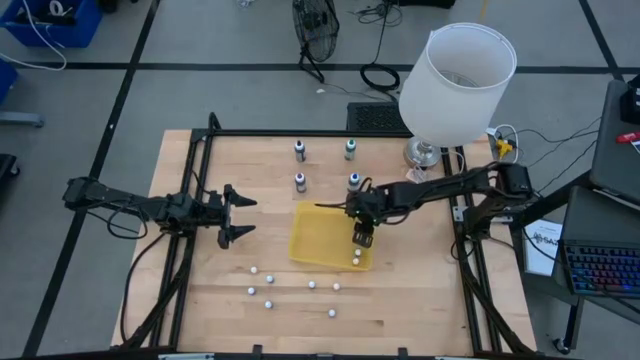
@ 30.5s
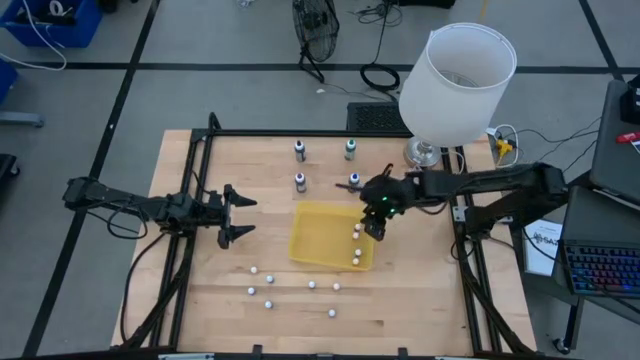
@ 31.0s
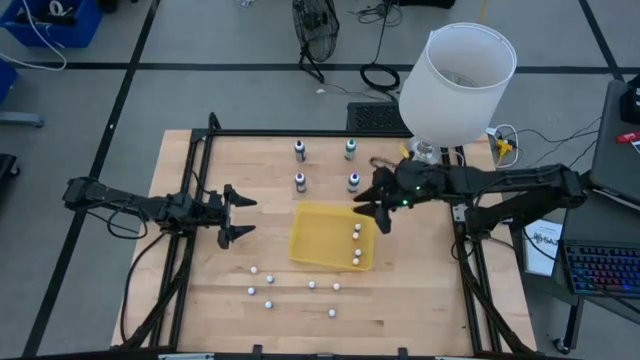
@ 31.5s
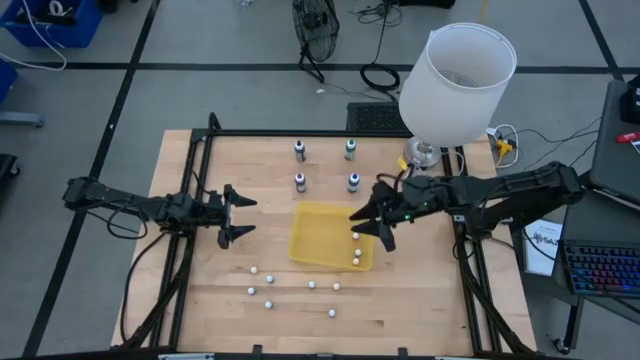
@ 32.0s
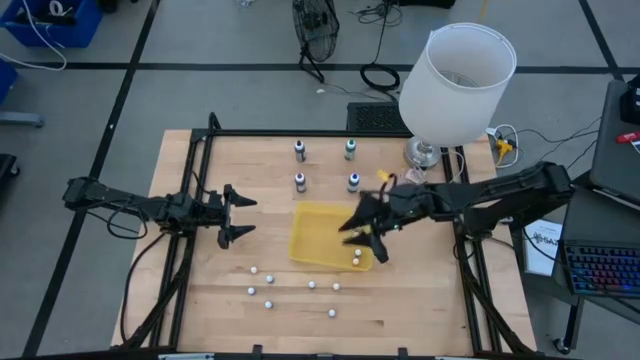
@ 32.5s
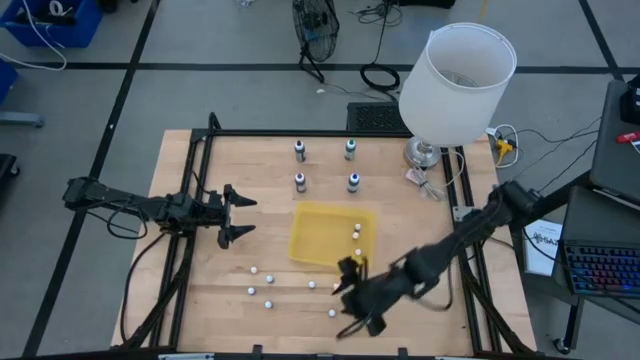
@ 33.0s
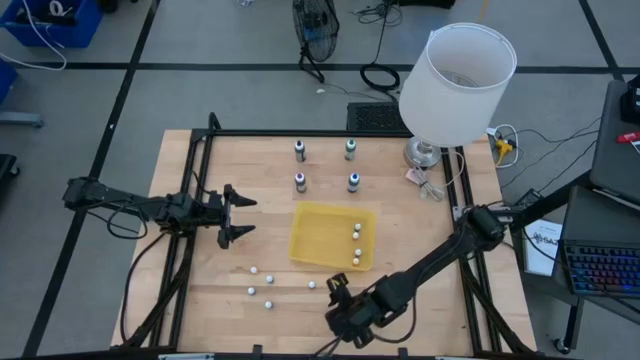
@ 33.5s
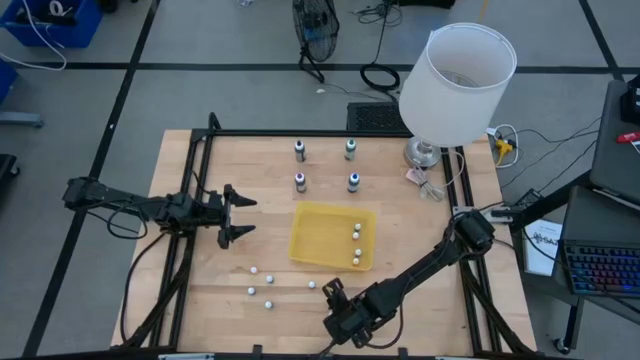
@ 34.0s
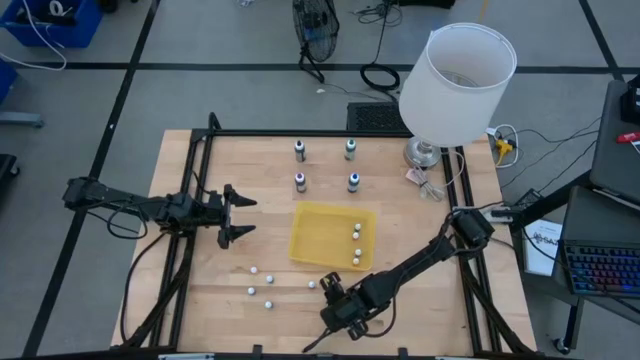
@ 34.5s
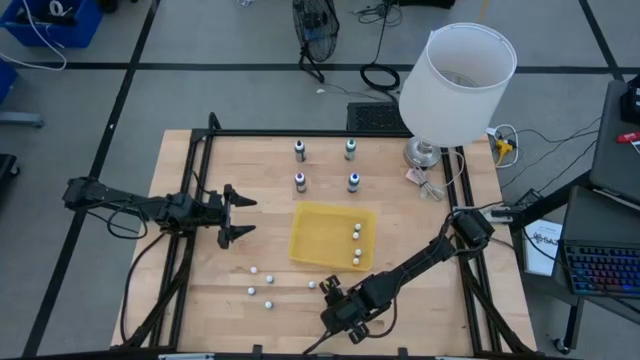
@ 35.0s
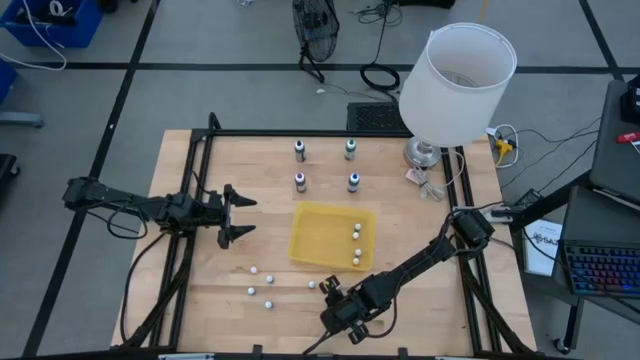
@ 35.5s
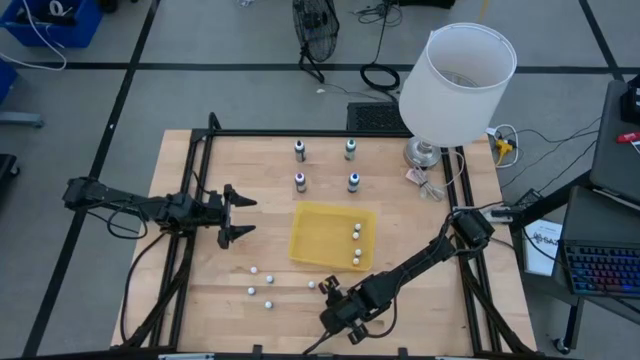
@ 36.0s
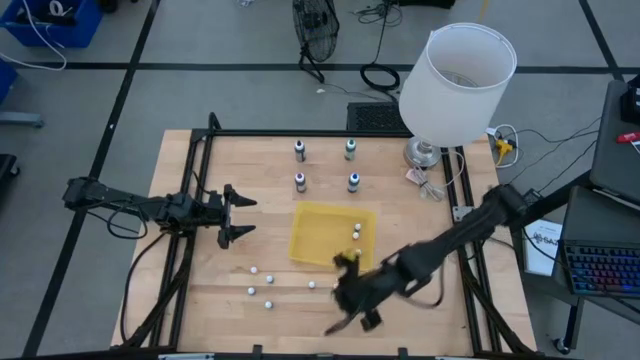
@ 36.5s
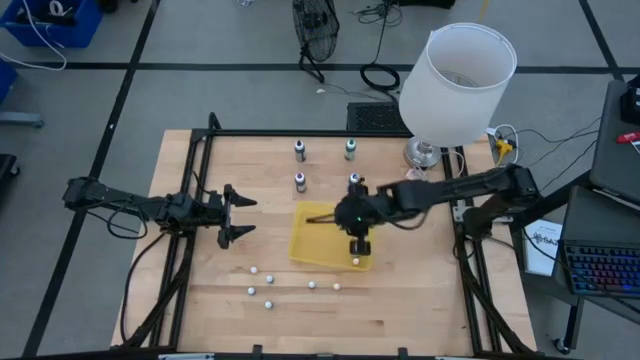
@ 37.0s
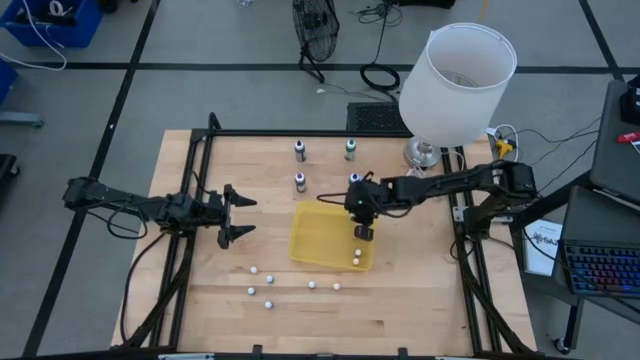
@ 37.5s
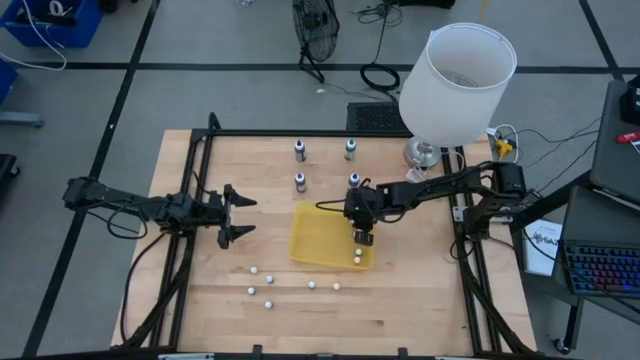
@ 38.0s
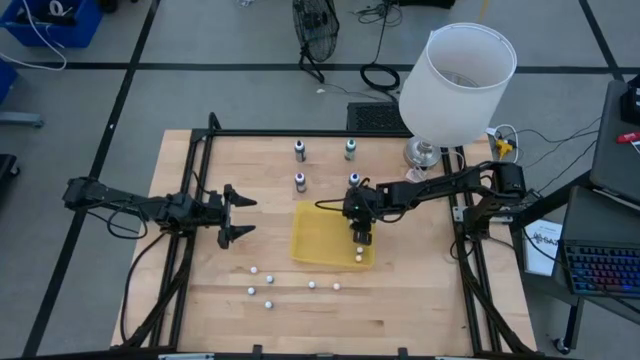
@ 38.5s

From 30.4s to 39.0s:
Task: Pick & Place food coloring
Put the small green food coloring bottle into the yellow container

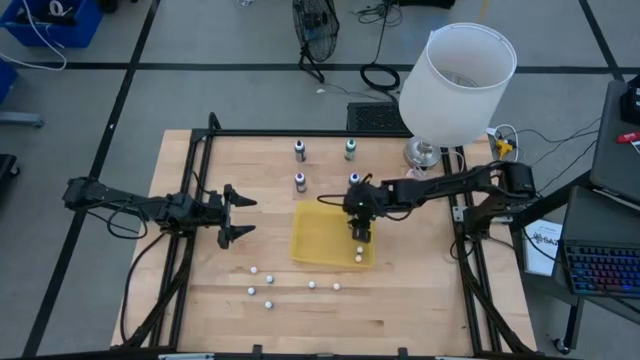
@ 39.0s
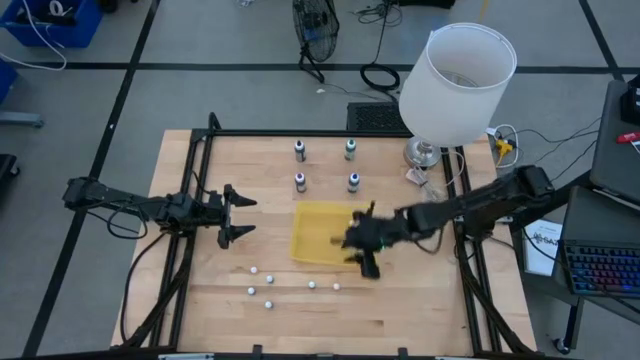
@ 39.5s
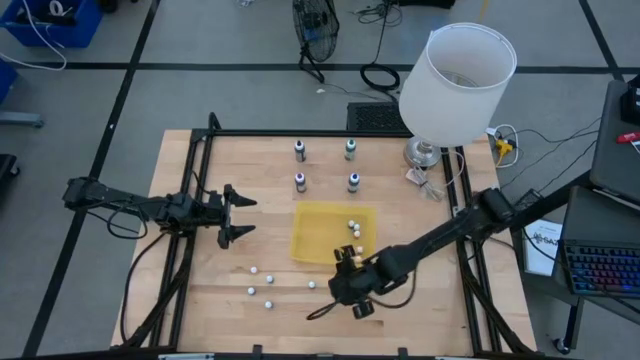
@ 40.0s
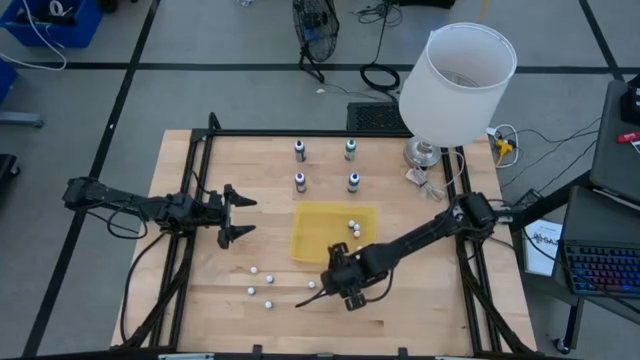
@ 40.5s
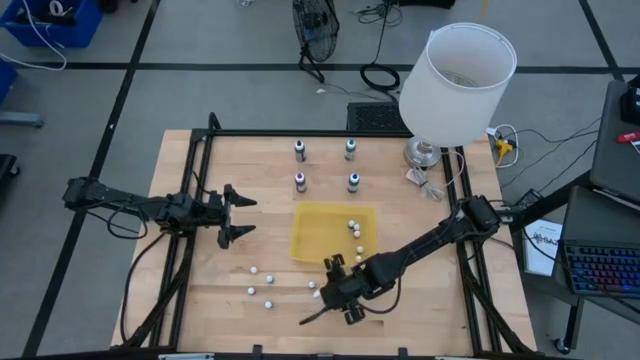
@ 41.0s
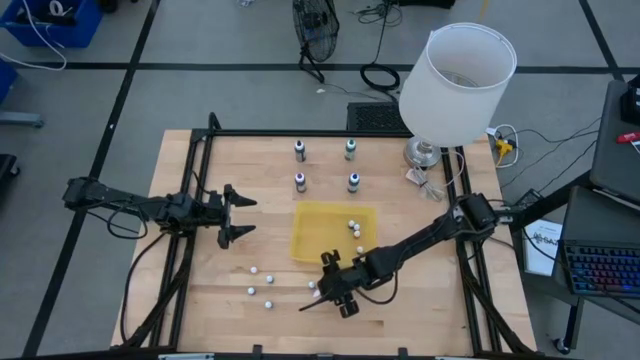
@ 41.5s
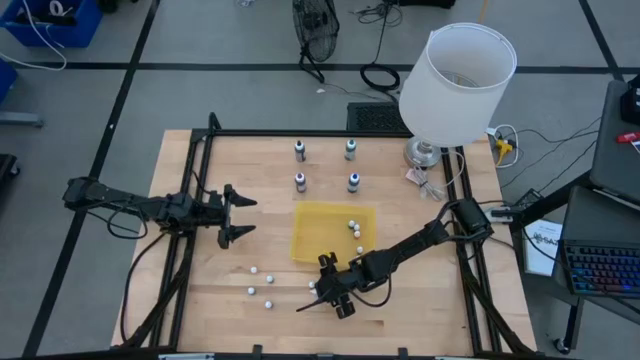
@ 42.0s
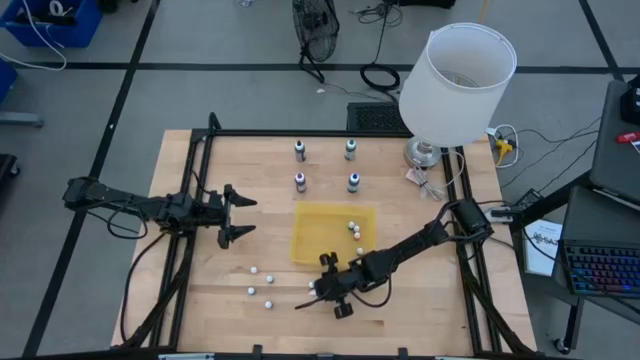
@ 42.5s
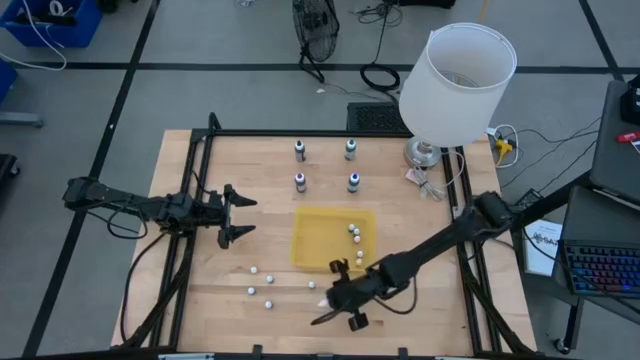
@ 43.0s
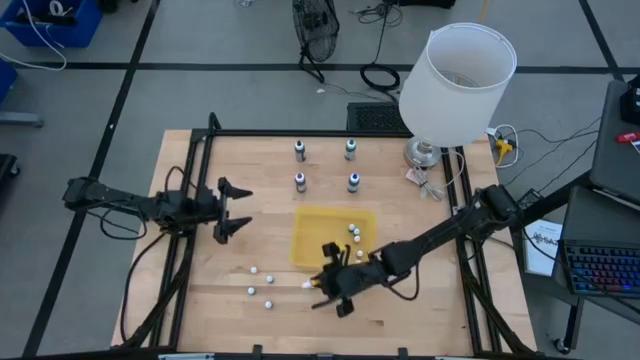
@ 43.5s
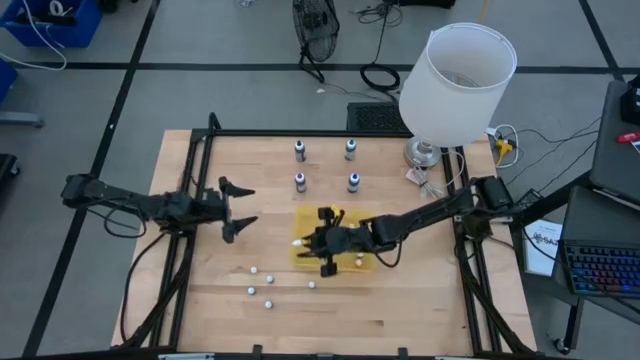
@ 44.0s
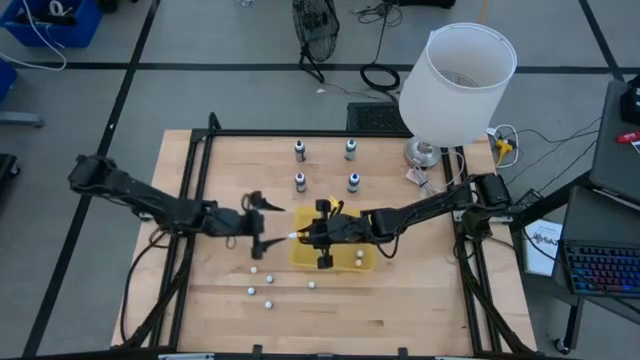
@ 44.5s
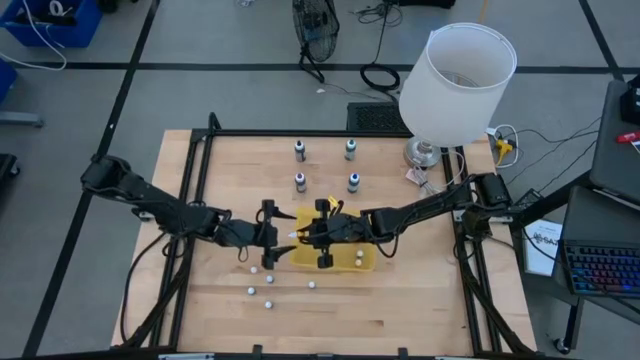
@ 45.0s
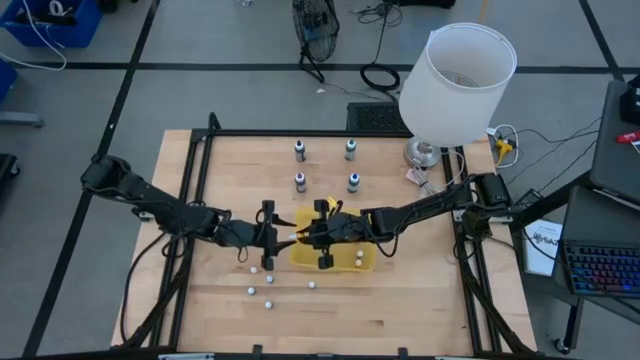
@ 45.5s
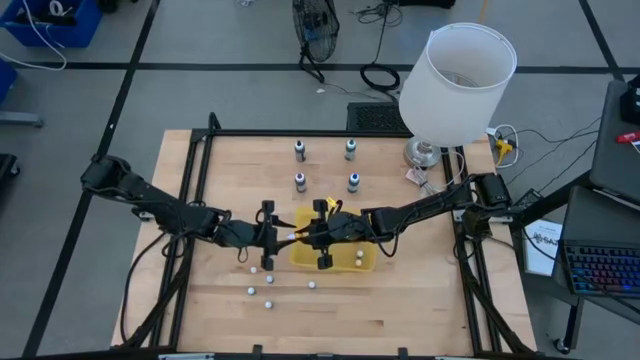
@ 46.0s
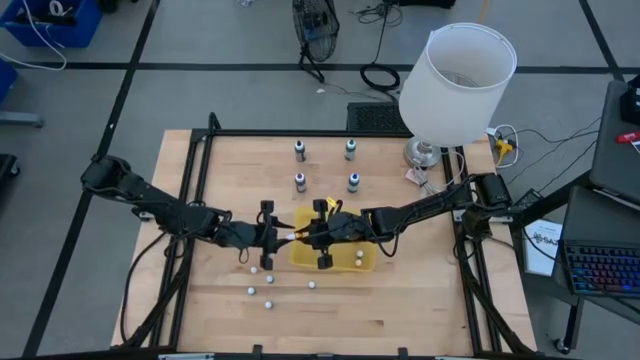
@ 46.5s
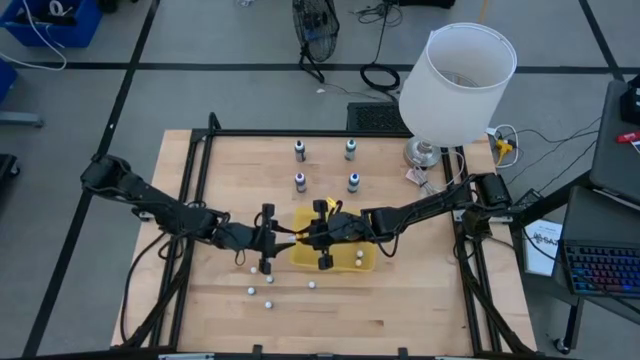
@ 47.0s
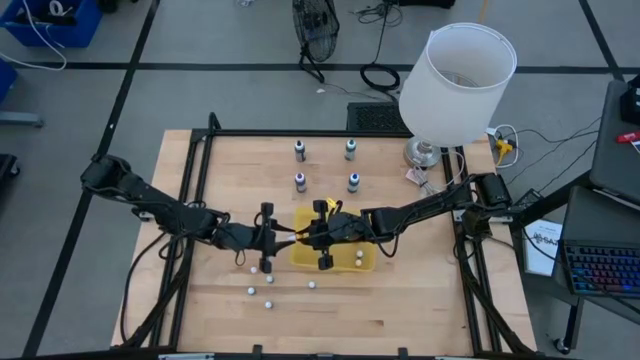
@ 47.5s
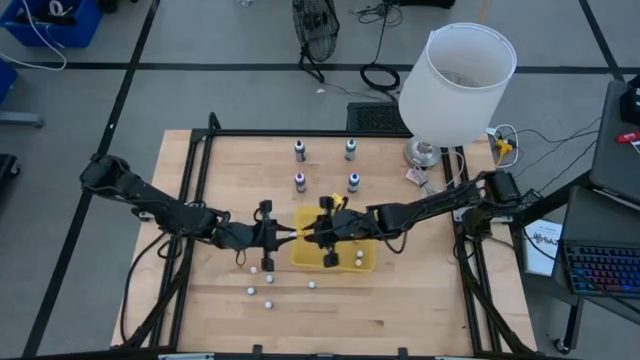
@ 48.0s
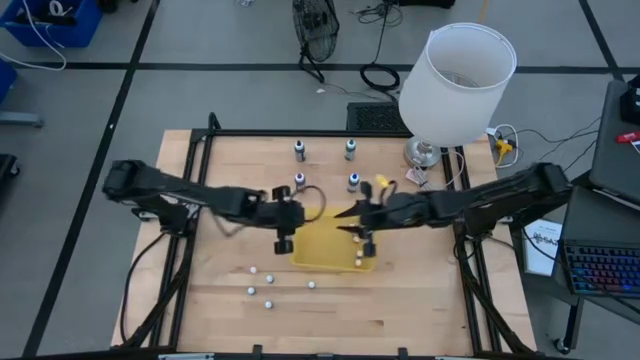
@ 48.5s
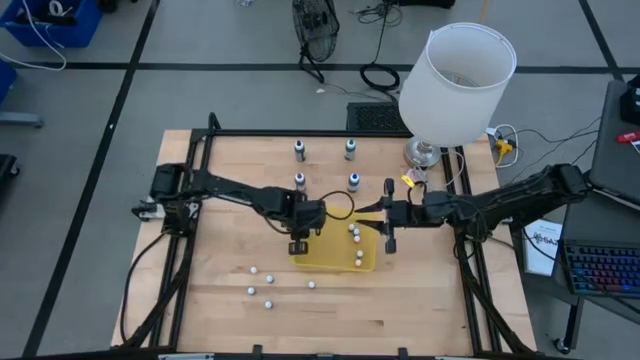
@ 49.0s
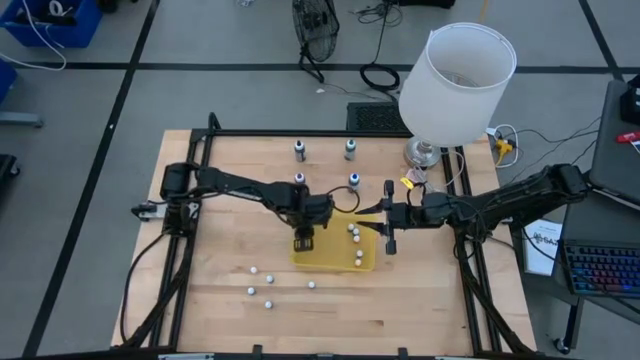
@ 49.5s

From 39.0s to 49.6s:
Put the small yellow food coloring bottle into the yellow container

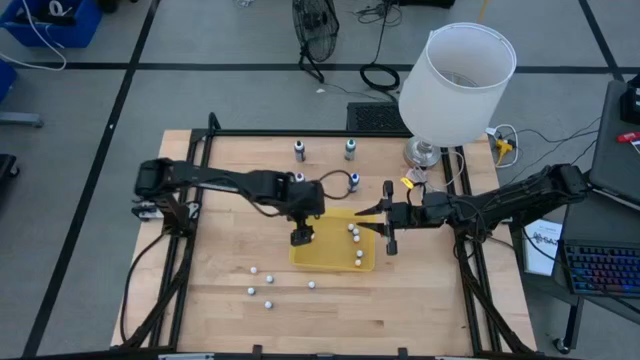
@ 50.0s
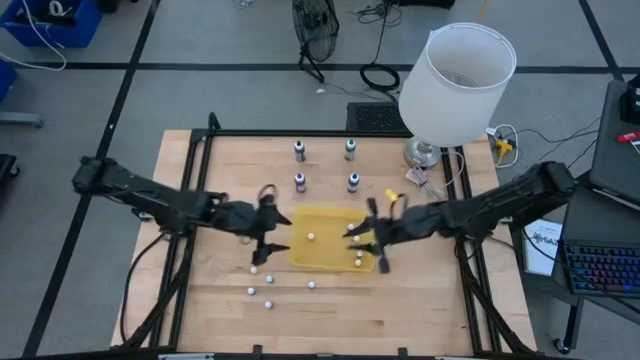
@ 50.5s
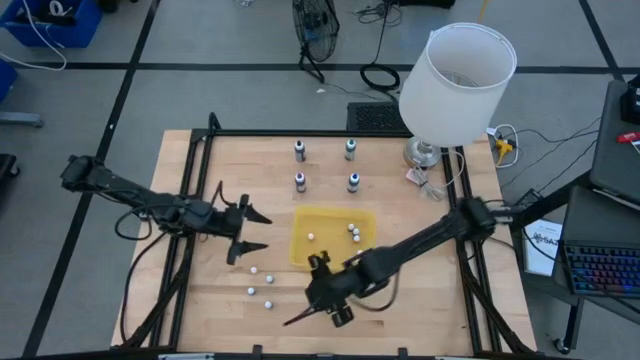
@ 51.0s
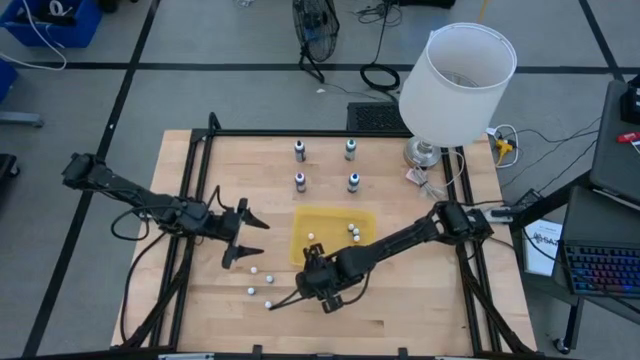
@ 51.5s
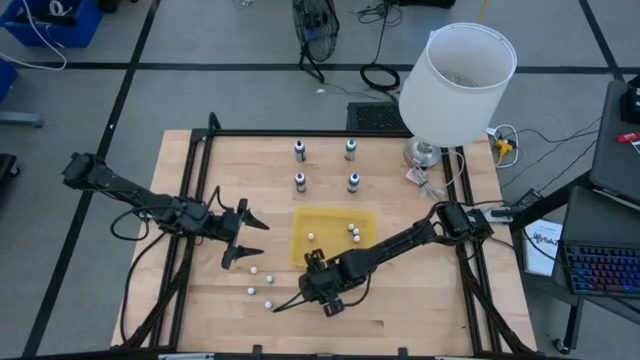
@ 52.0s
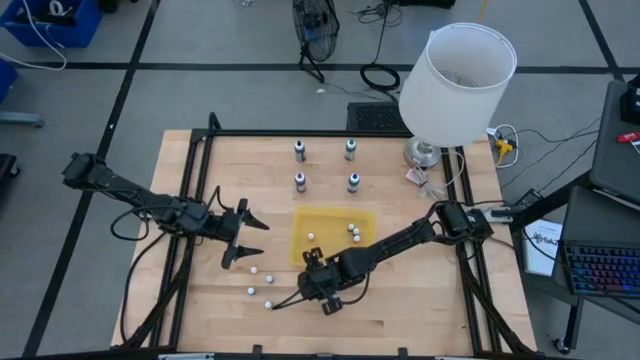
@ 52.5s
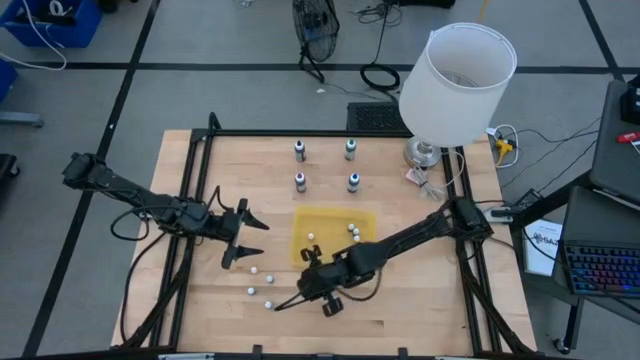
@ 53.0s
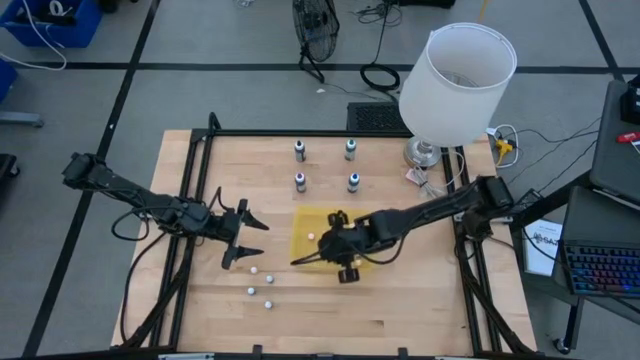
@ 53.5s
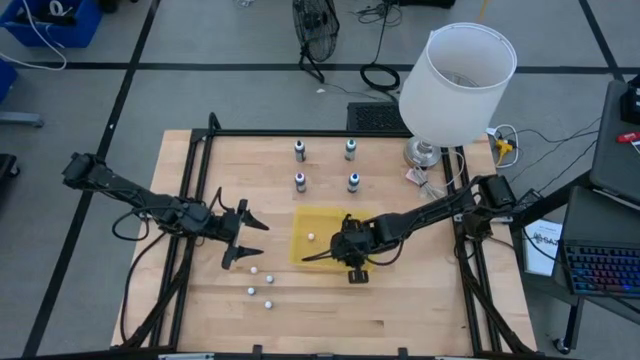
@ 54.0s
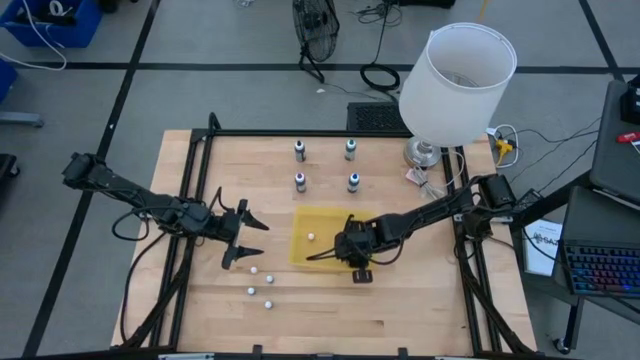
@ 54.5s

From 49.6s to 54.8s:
Put the small red food coloring bottle into the yellow container
